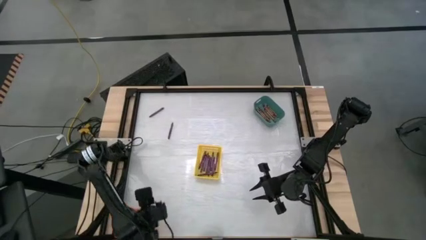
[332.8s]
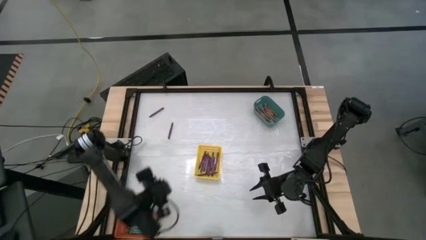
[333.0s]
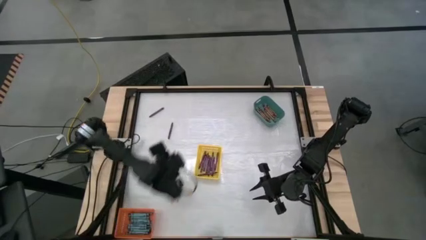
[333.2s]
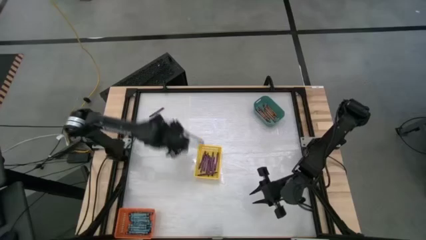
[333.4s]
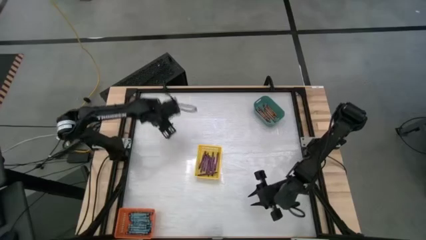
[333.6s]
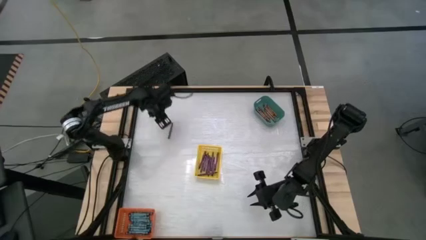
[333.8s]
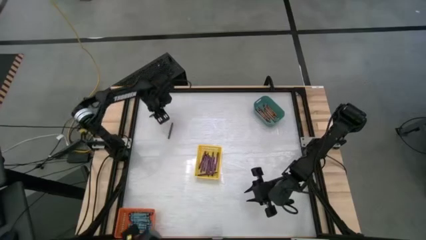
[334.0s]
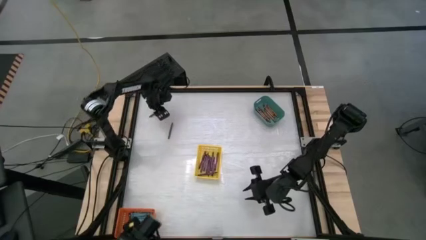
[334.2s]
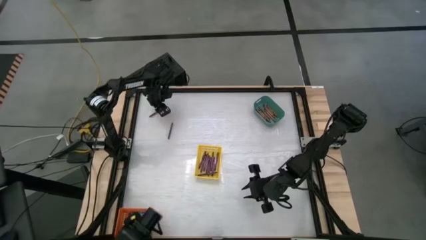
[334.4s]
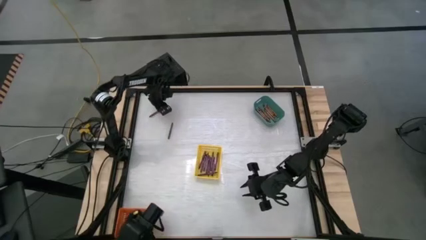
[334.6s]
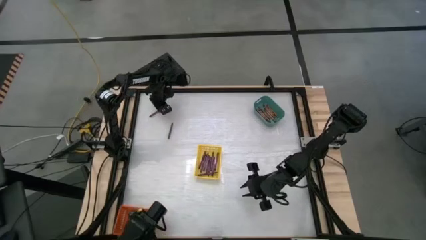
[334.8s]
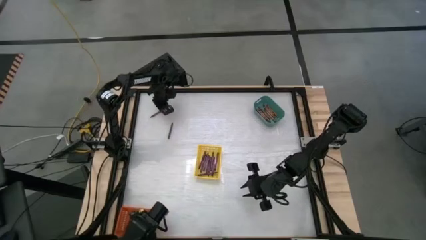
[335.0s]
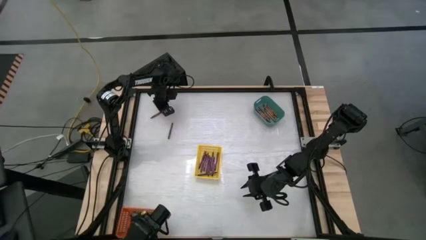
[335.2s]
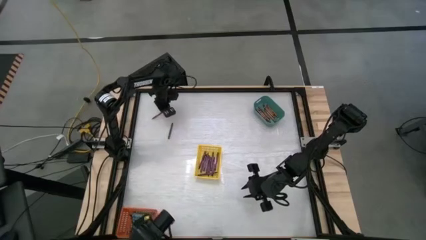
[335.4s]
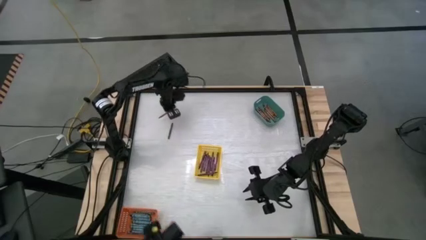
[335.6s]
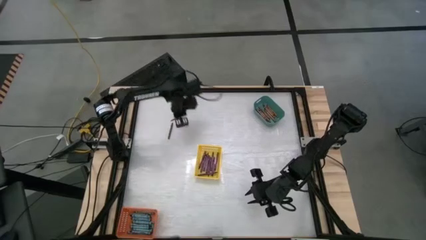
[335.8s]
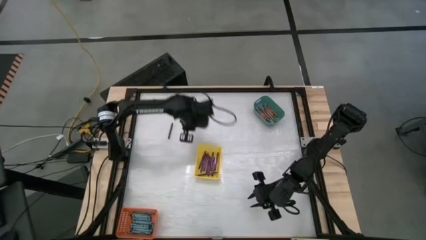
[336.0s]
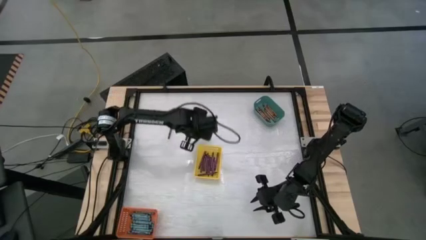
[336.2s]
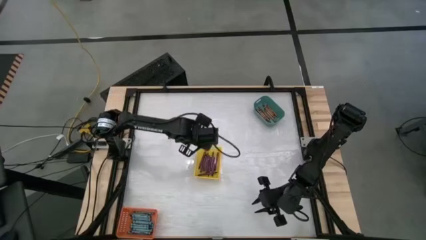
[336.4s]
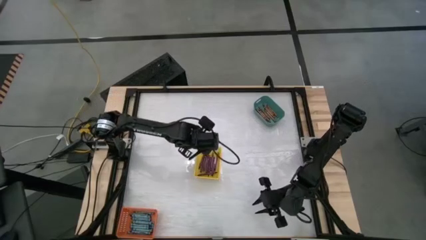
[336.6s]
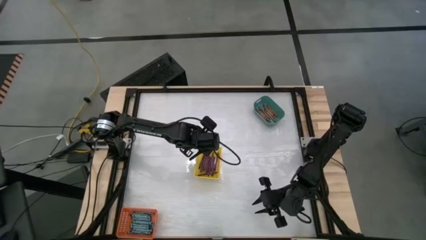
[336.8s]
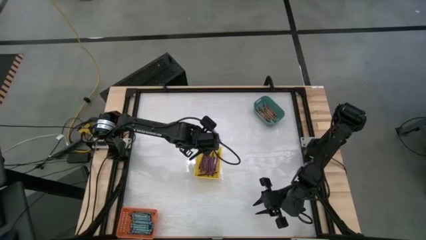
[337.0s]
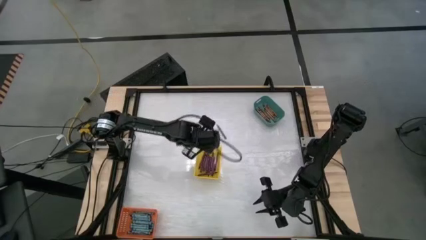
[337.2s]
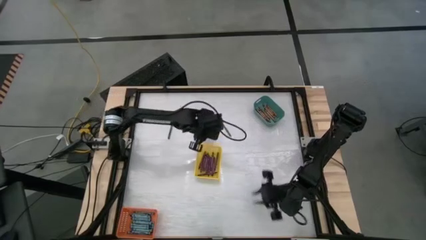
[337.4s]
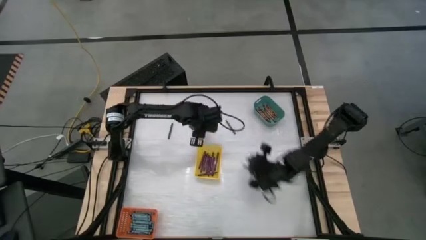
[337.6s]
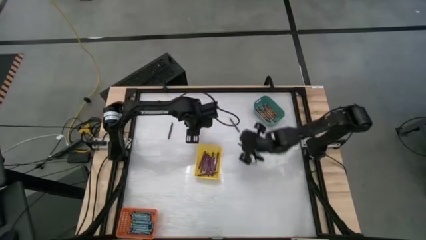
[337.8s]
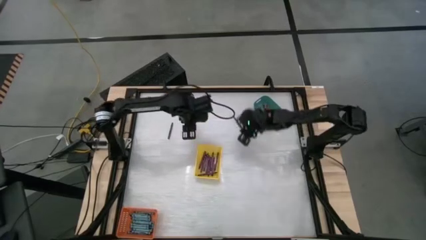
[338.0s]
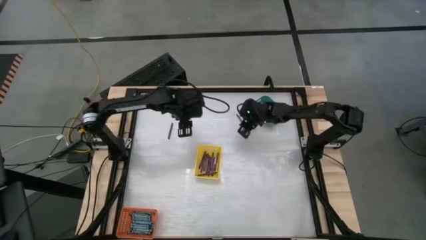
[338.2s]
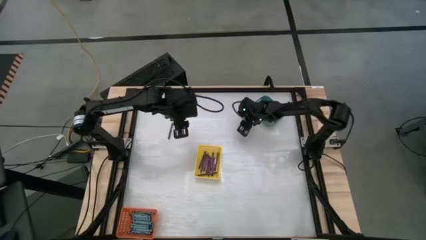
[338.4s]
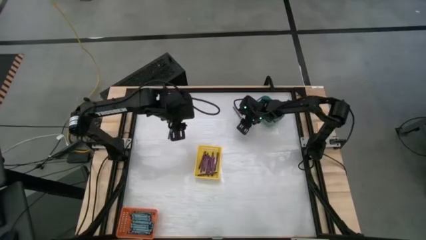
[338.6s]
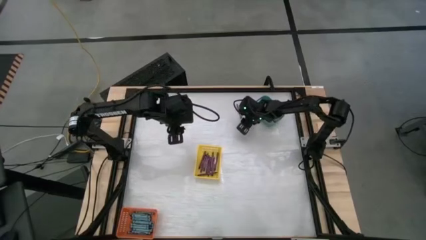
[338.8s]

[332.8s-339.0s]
Task: Sort crayons
Put the violet crayon into the yellow basket

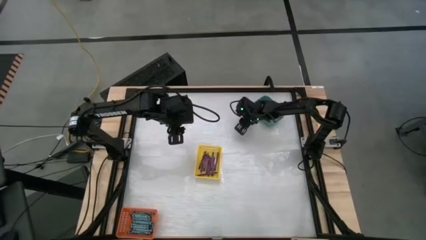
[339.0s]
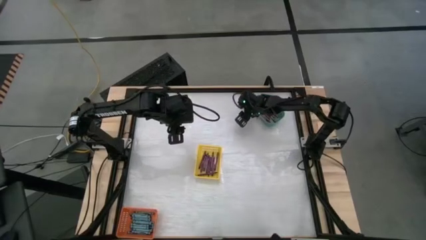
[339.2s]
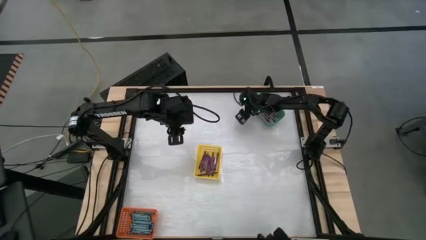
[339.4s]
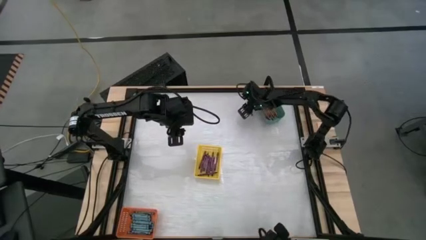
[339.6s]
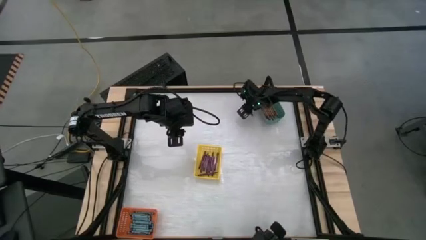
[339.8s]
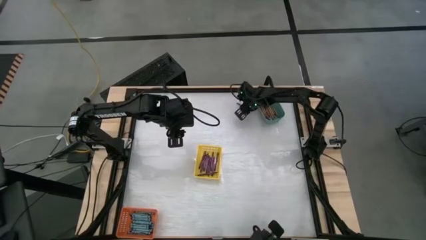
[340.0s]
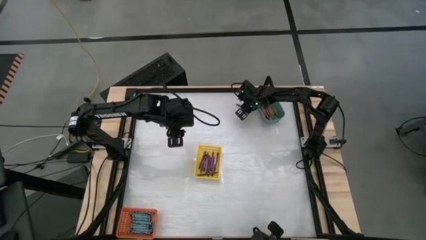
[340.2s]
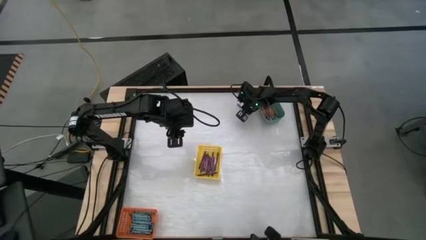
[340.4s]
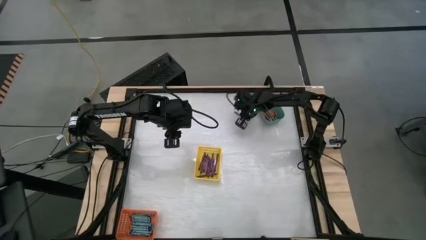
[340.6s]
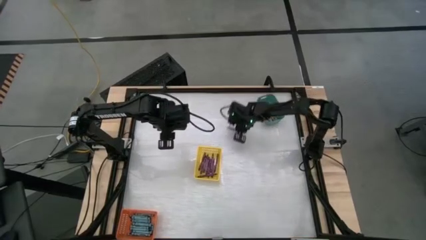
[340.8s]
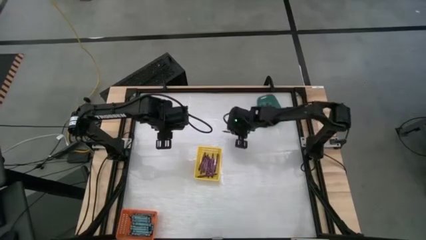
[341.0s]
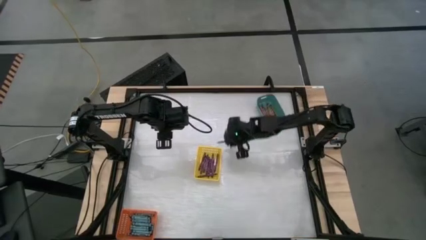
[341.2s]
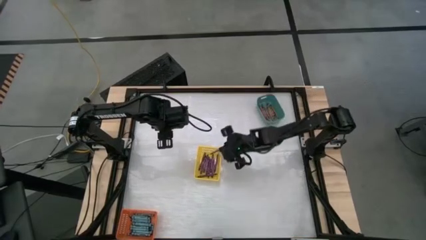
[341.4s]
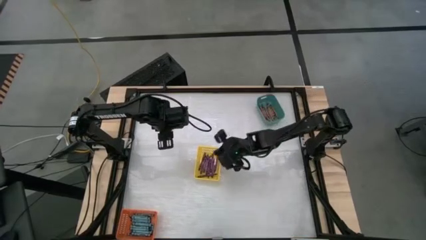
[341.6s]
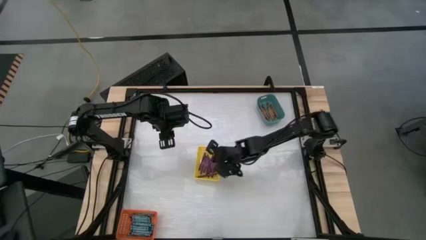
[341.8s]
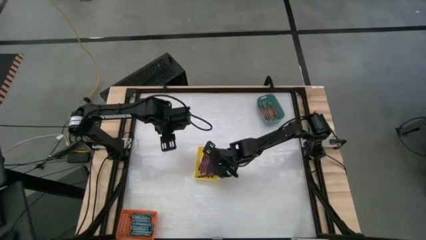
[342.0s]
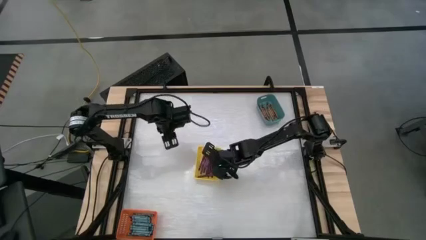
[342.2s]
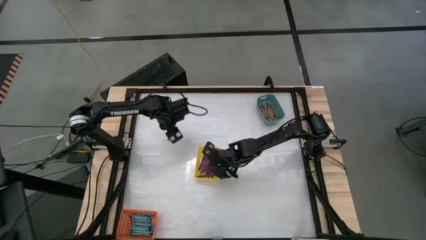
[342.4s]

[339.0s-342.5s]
Put the violet crayon into the yellow basket

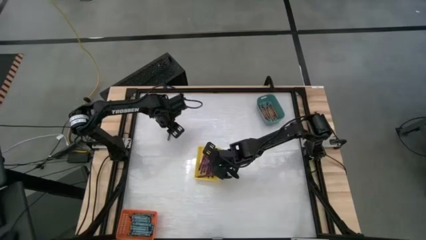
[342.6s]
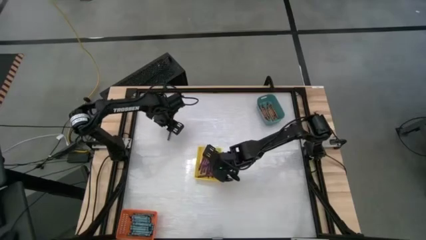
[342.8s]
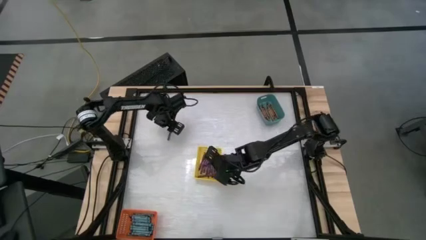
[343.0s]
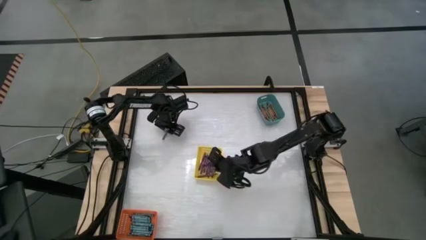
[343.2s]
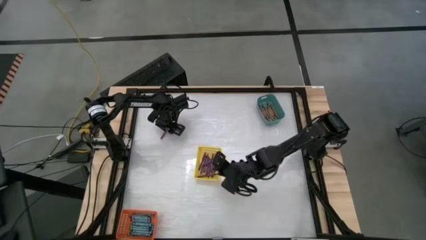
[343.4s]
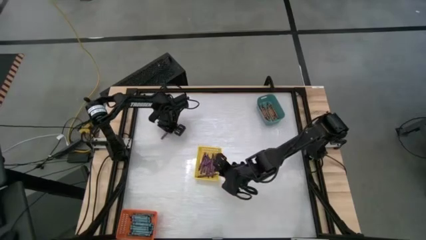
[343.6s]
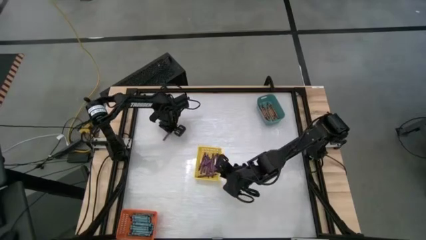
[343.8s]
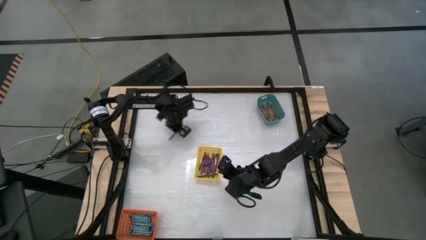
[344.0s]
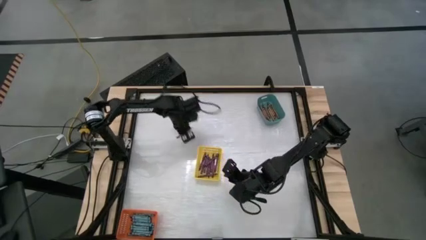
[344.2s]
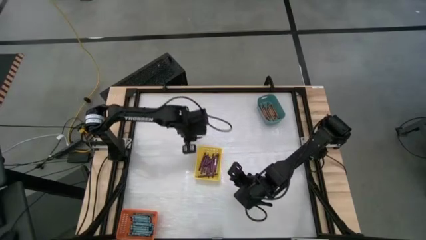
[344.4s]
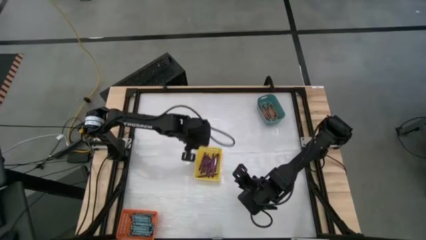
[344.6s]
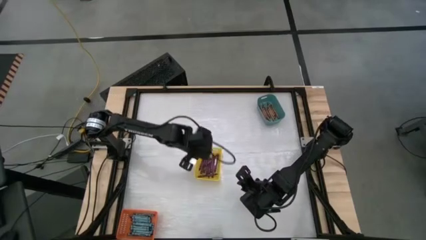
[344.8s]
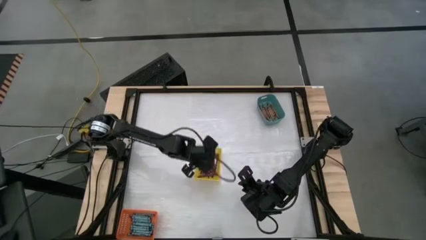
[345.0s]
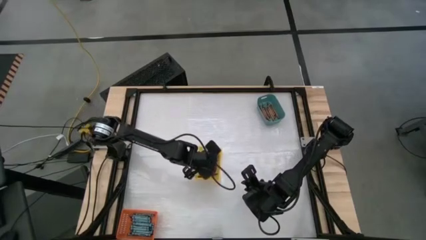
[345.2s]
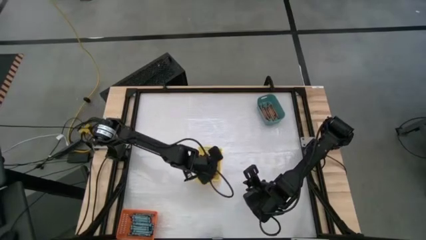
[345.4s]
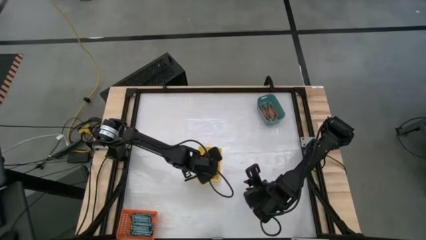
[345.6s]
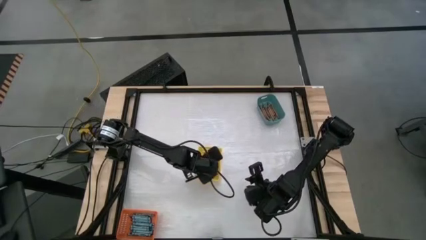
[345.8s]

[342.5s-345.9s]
Put the violet crayon into the yellow basket

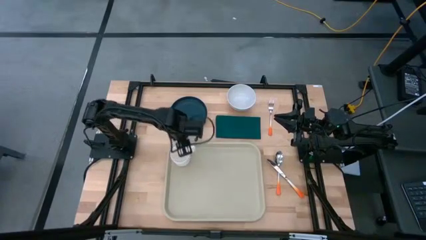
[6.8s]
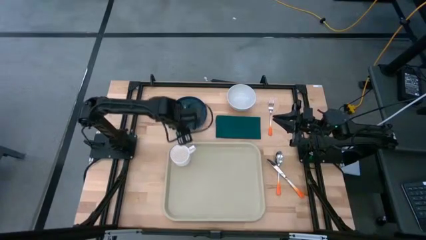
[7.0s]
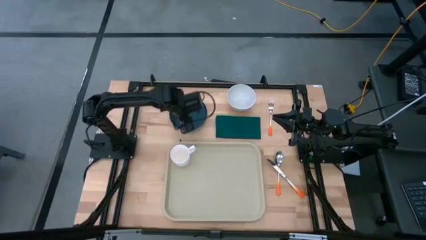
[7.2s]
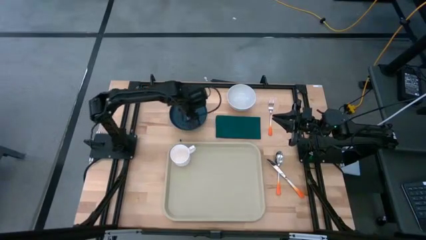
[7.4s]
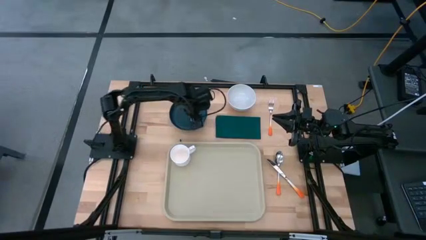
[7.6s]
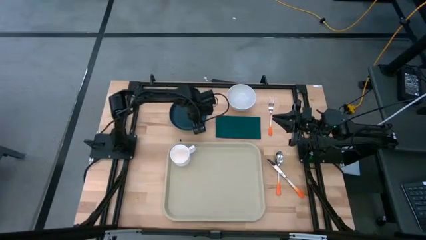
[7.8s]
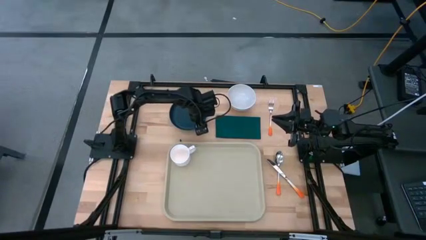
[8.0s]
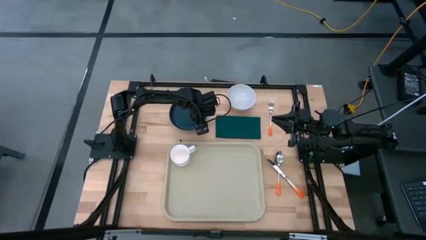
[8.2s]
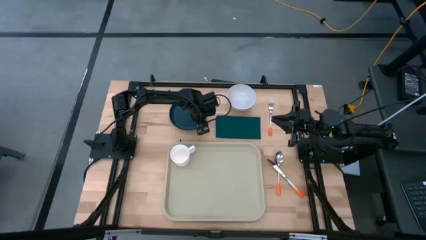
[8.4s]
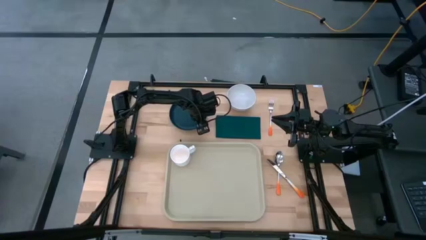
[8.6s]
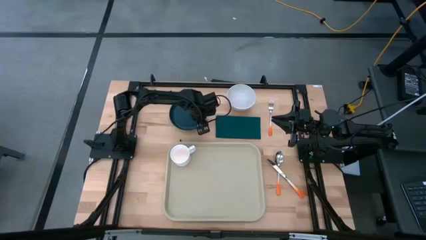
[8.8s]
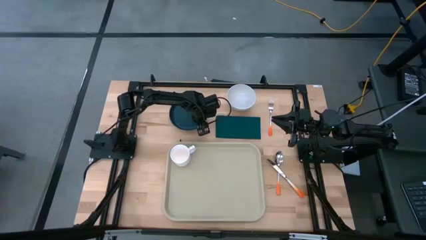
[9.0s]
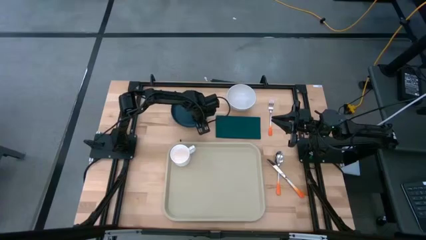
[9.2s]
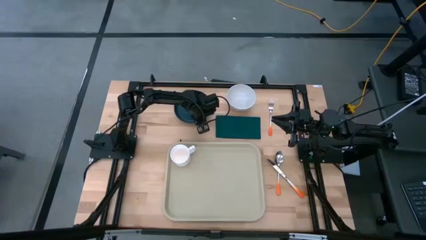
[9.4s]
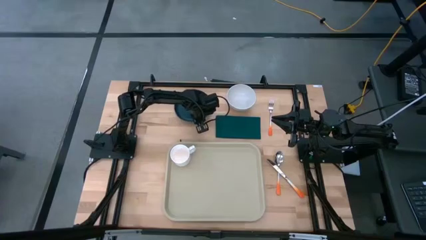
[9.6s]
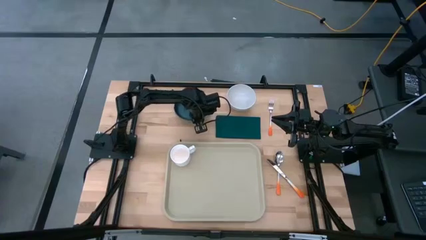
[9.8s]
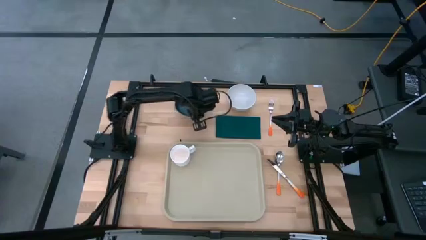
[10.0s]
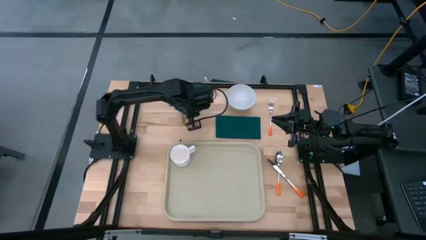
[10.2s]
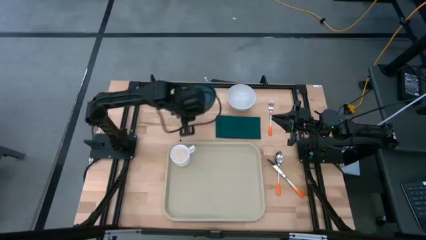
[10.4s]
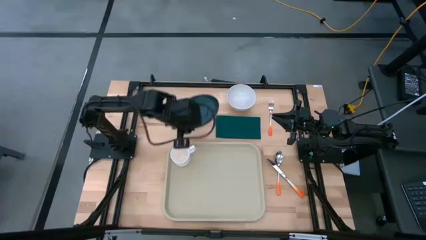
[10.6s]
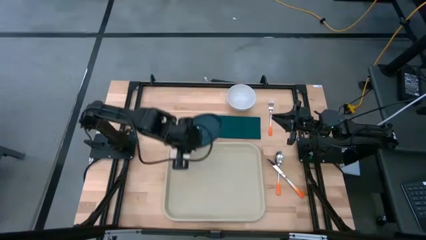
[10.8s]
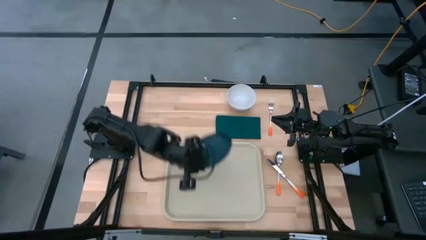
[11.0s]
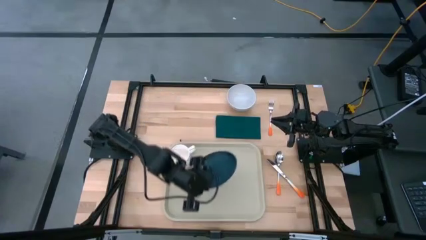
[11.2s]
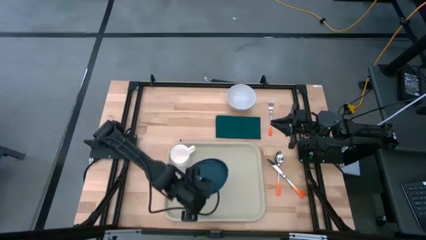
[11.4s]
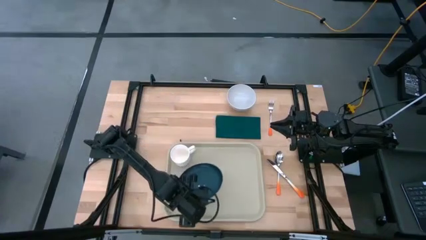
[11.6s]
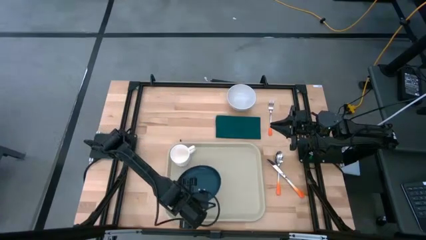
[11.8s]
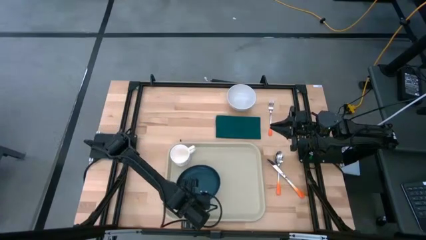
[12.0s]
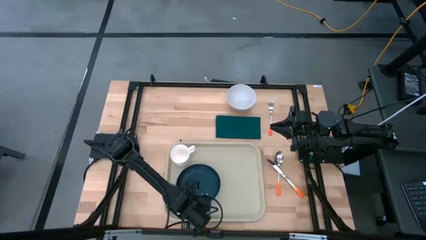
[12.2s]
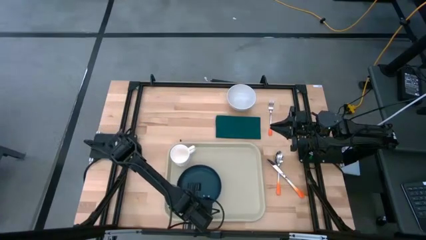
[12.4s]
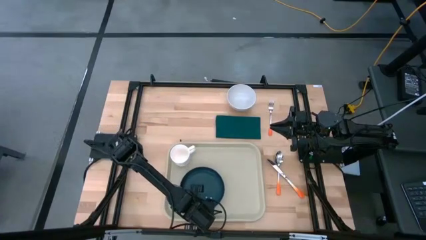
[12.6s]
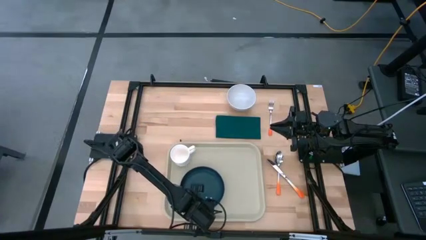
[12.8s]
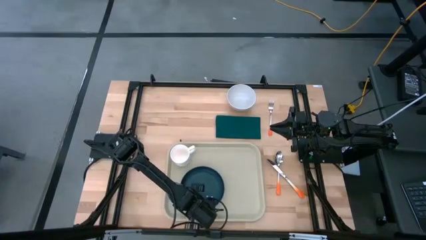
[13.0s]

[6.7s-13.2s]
Task: Set up tray
Put the black plate on the white tray at the bottom right of the white mug
